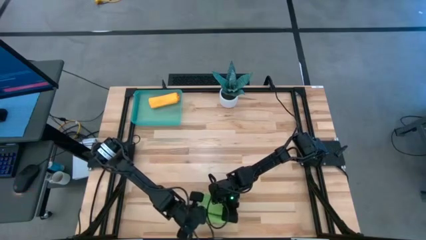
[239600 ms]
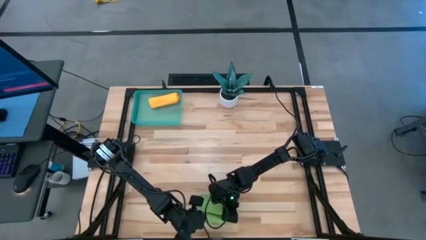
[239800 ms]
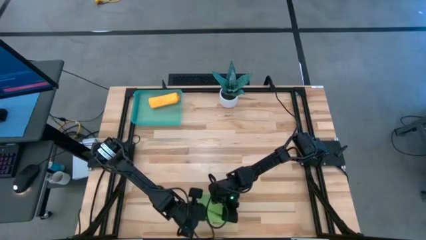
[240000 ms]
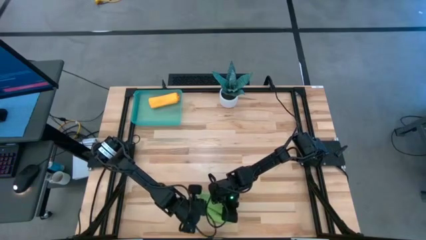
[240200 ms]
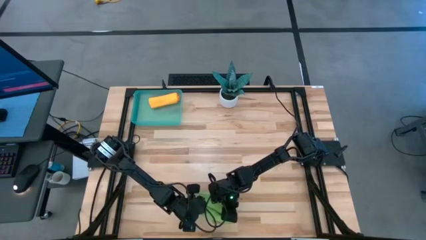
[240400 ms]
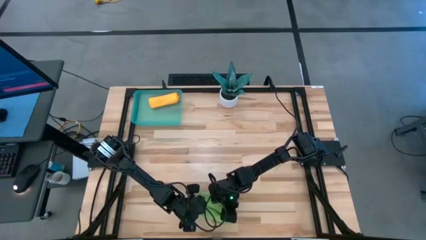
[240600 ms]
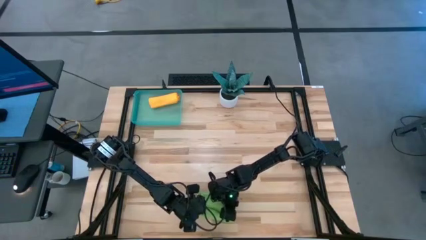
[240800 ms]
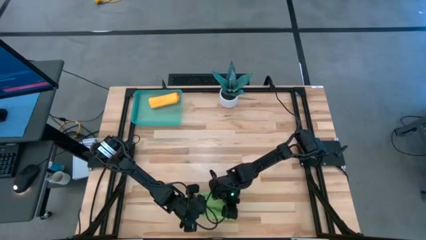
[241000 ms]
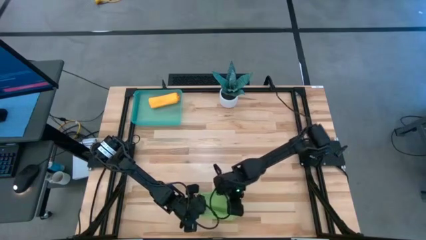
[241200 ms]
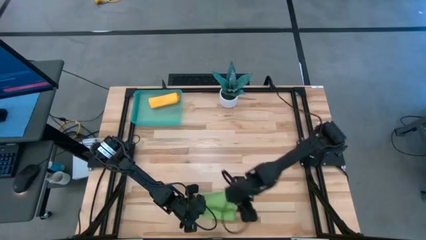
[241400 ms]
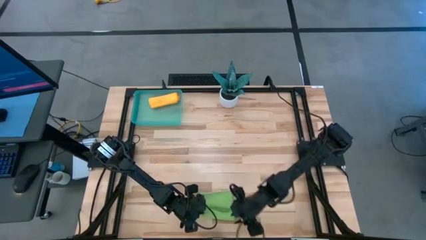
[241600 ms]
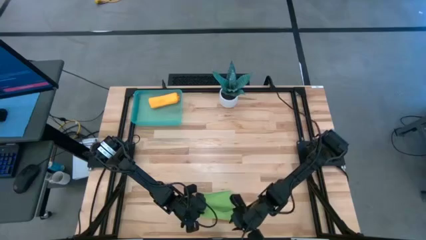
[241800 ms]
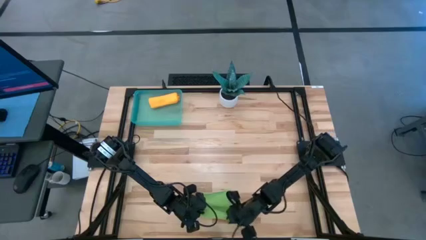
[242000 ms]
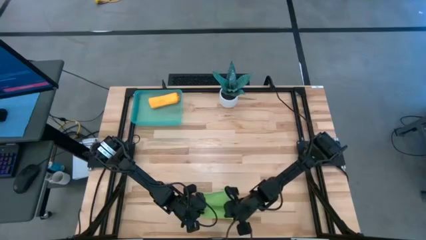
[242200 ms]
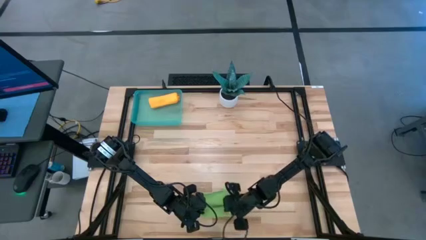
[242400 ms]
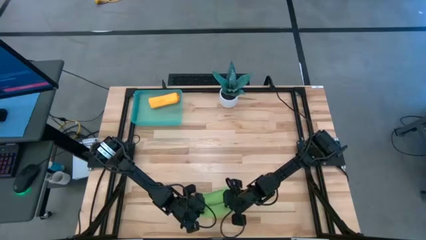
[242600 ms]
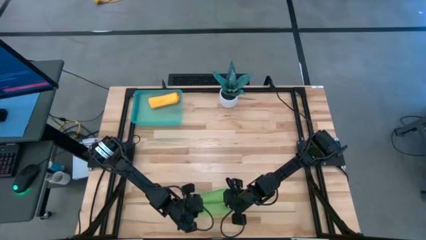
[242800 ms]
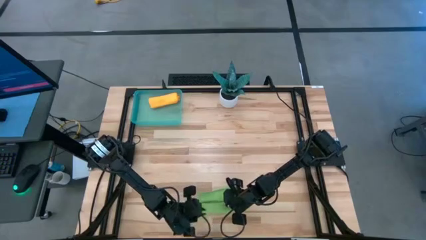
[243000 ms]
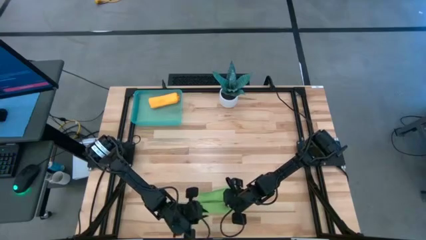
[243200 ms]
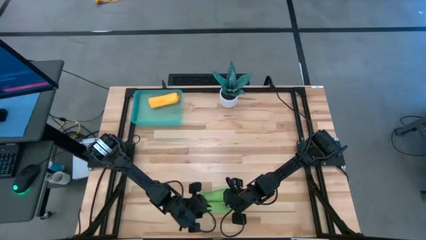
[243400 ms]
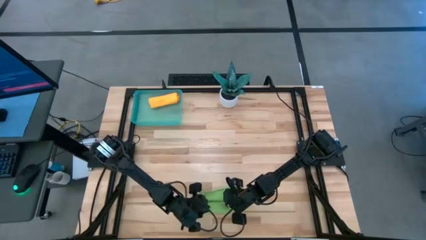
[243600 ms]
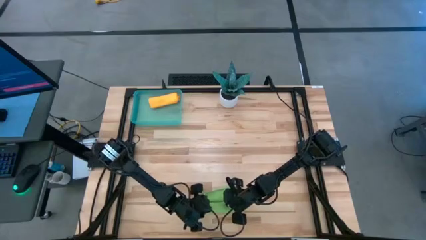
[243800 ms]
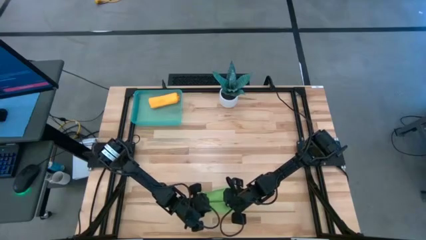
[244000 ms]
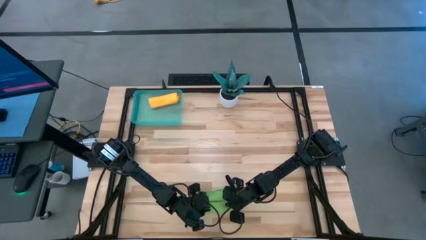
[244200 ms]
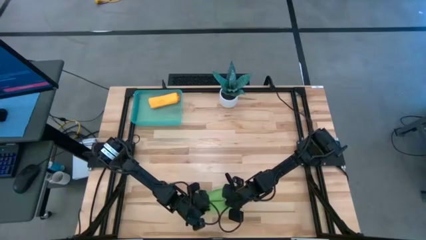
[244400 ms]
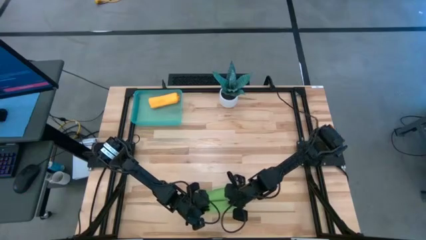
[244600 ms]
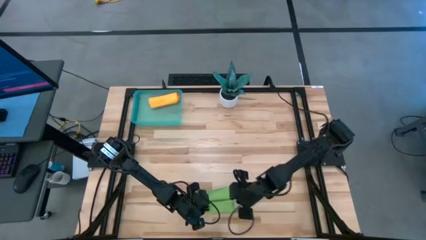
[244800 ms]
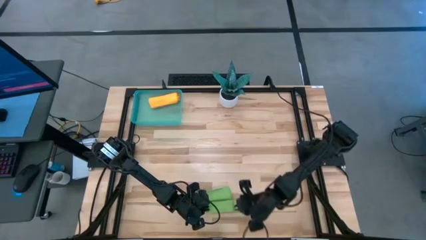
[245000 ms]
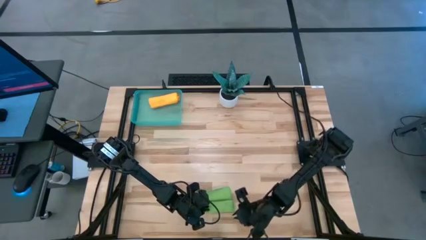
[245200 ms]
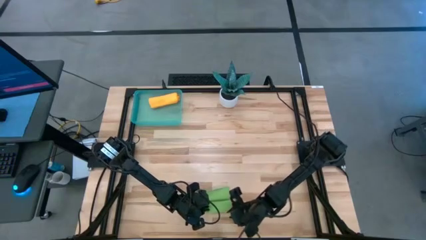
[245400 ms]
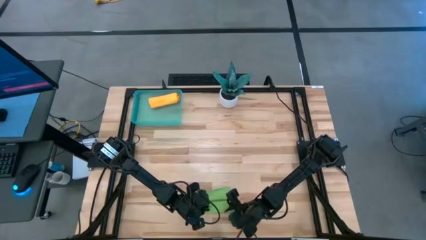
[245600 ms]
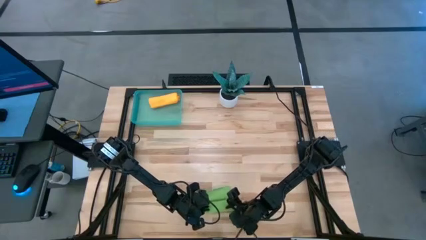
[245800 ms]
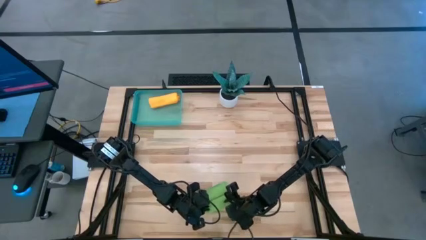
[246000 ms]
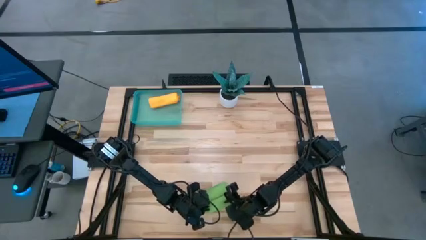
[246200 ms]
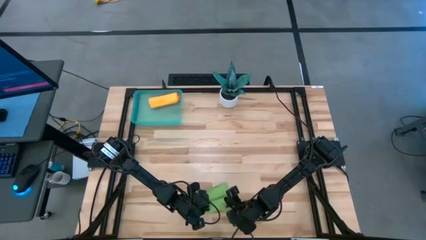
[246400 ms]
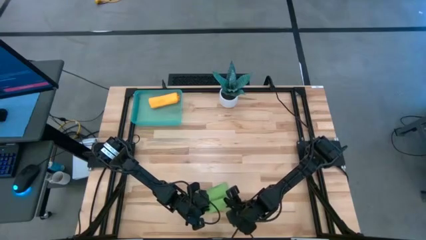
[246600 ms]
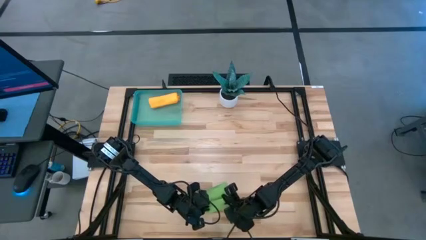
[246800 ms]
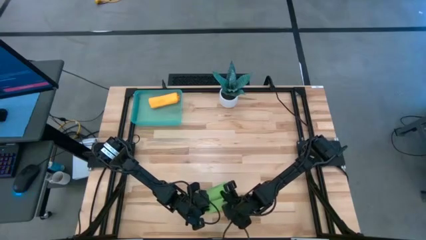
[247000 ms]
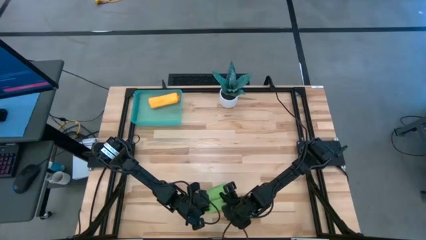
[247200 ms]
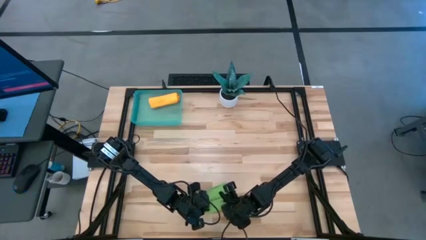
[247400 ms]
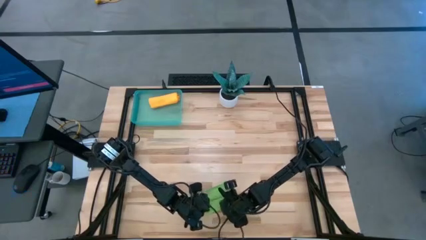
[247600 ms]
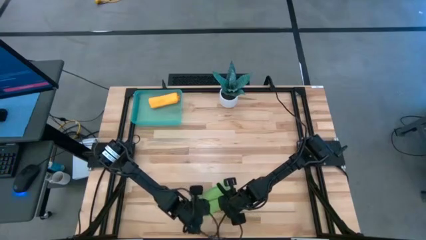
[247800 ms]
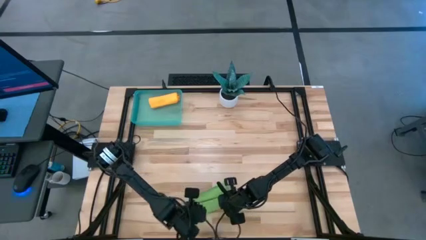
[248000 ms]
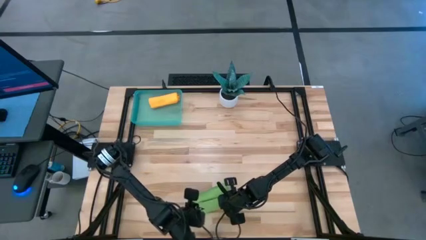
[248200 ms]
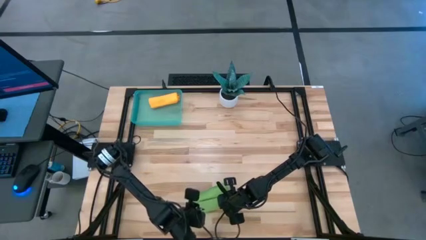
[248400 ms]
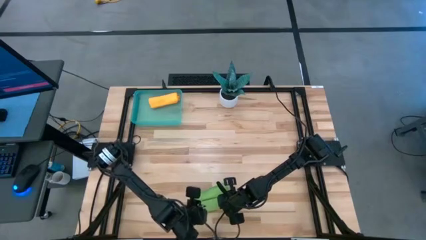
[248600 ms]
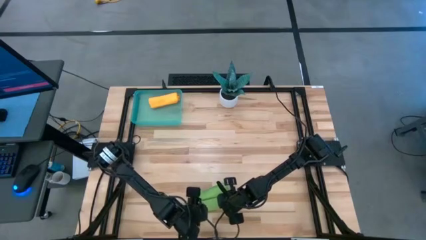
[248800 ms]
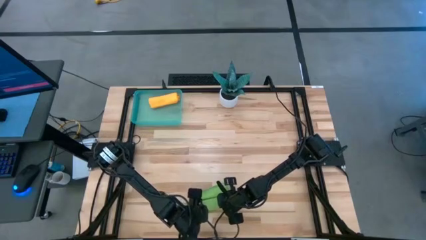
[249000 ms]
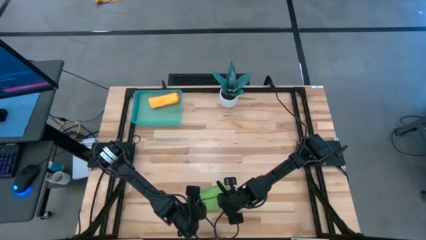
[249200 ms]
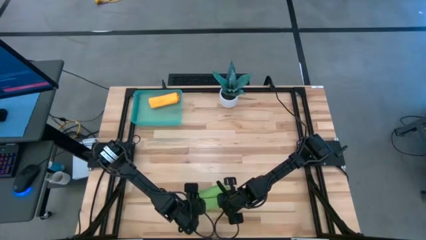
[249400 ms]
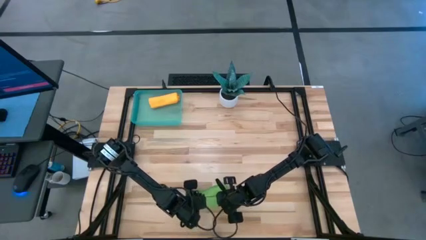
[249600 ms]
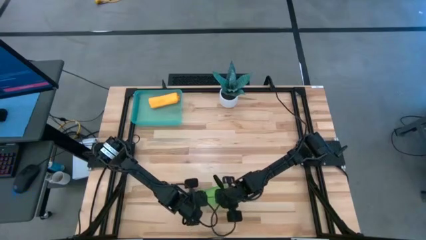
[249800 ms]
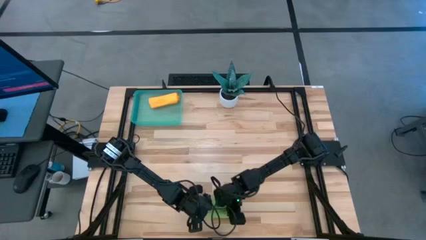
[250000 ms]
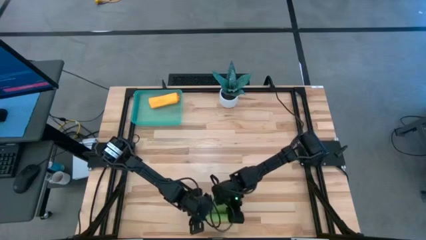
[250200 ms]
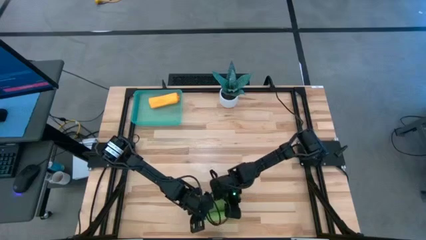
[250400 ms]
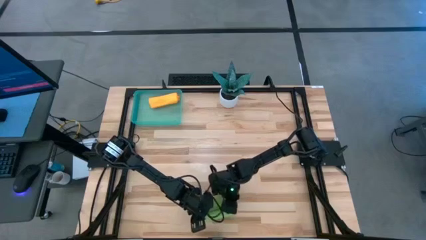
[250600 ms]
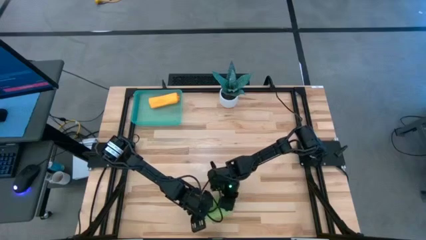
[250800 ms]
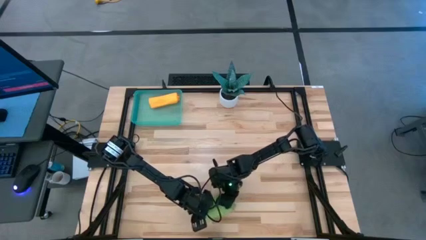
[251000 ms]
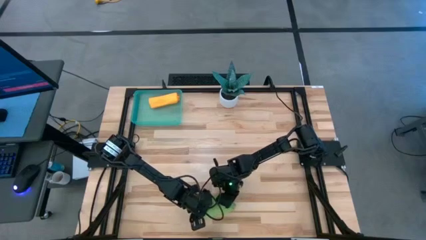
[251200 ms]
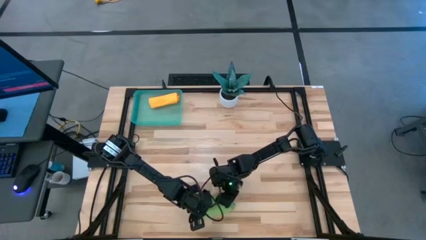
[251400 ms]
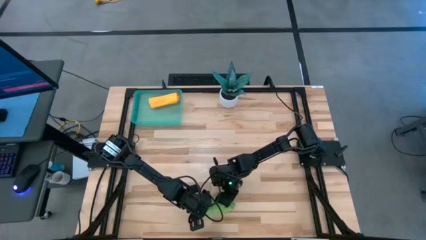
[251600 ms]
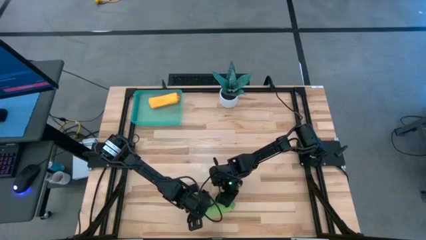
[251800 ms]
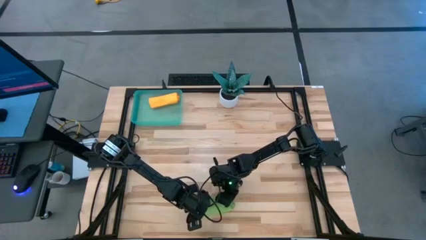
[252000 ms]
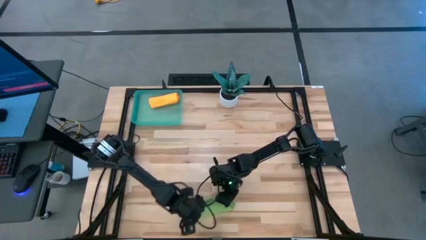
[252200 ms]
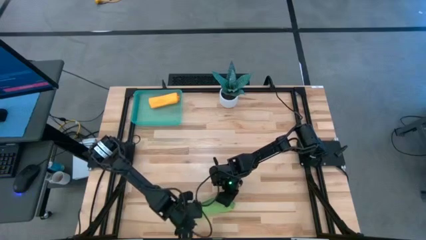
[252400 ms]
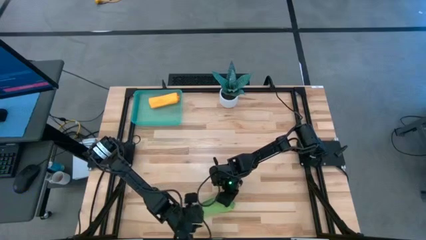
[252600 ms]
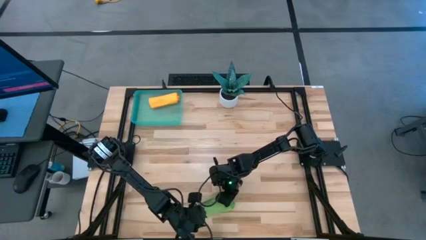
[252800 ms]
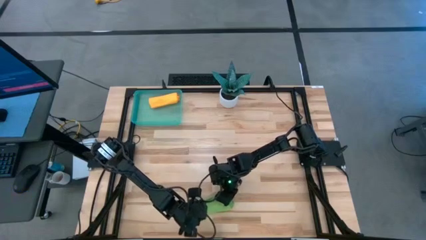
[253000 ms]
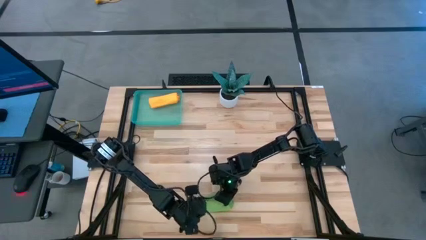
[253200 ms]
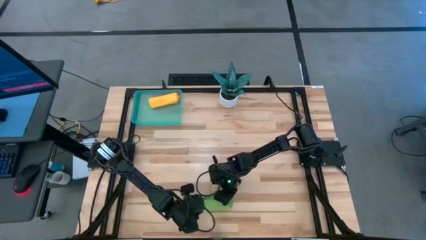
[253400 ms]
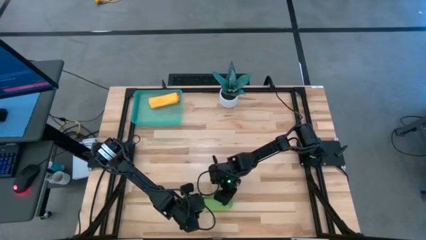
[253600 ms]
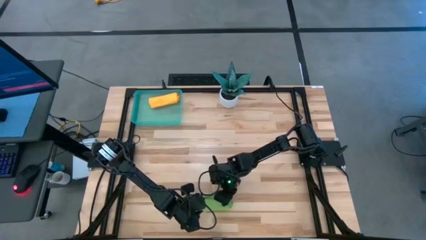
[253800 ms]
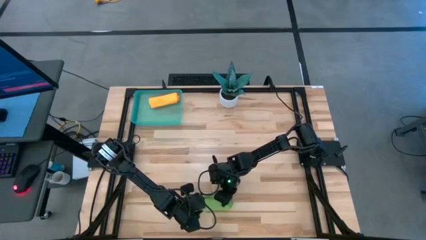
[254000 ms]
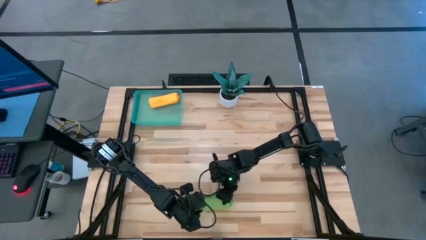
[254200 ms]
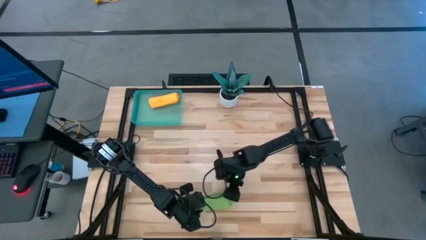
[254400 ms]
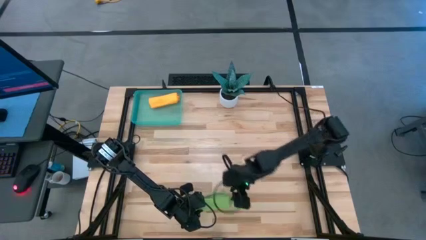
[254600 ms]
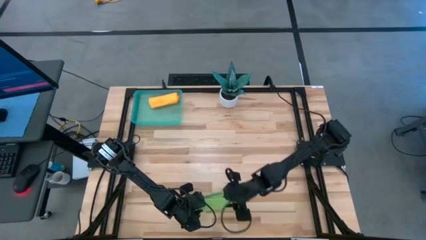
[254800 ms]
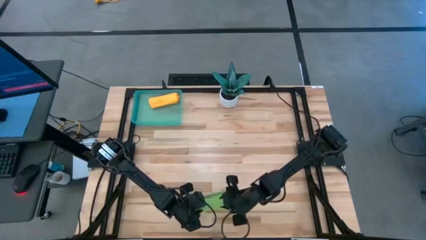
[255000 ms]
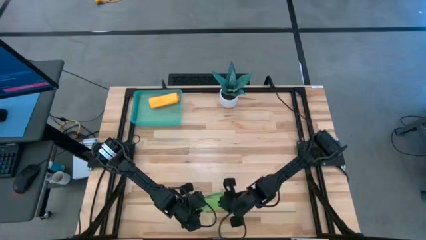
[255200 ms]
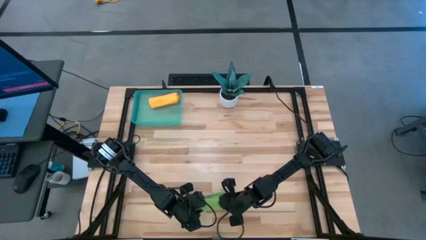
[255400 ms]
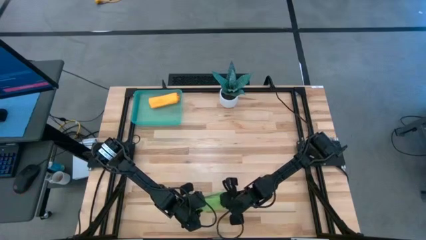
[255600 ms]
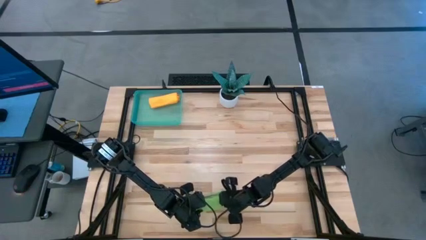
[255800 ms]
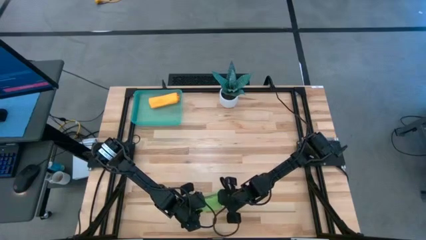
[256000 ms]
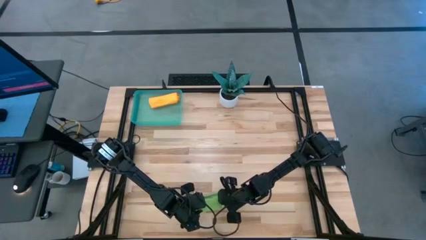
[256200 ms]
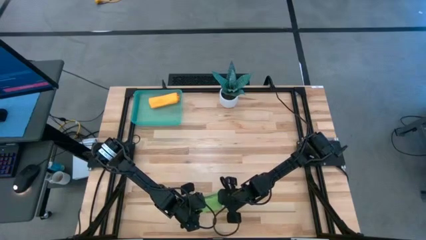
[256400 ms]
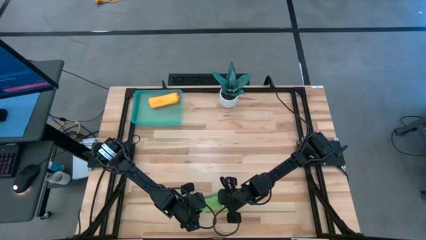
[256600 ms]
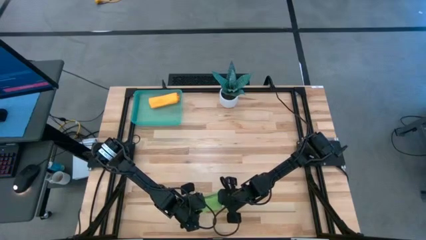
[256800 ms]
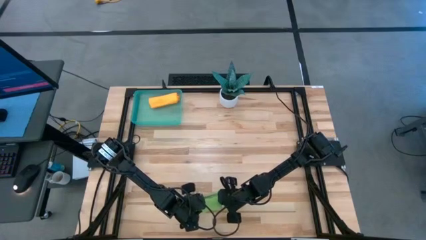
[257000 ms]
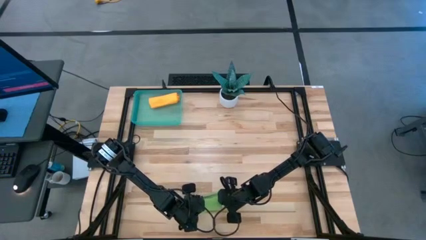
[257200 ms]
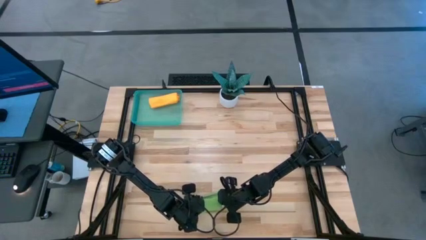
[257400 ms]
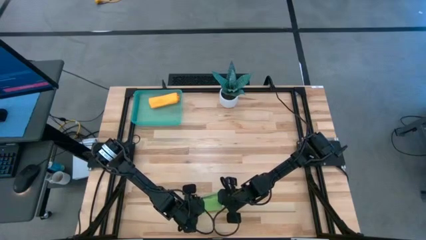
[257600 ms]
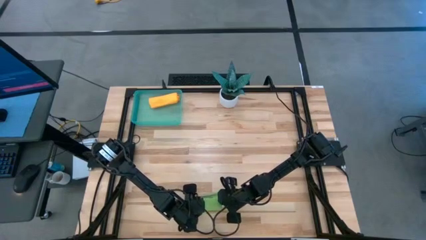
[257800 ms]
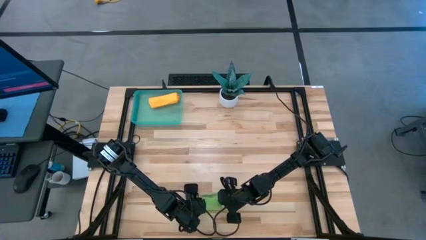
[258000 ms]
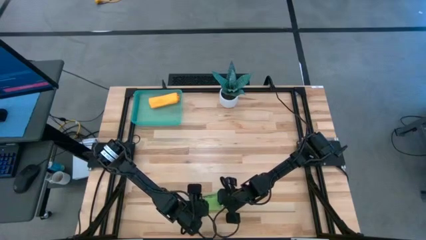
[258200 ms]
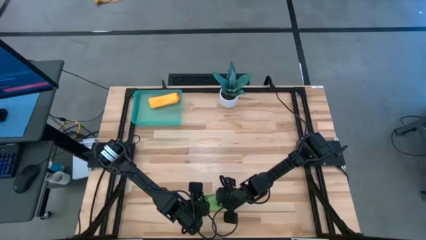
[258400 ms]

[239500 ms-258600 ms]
Task: Roll microfiber towels into tight, uniform cylinder then place into a basket
Roll the light green microfiber cloth
